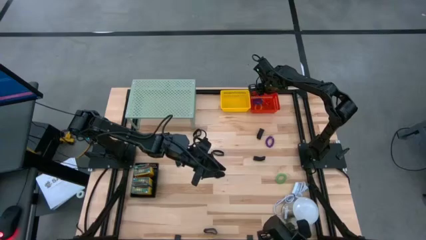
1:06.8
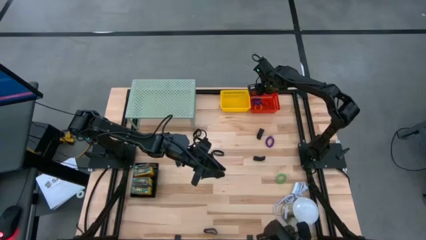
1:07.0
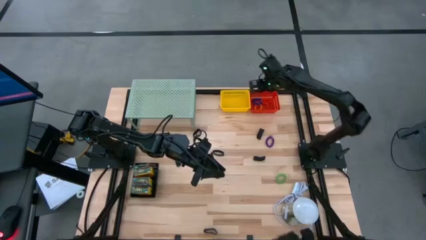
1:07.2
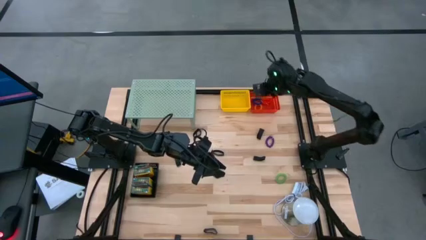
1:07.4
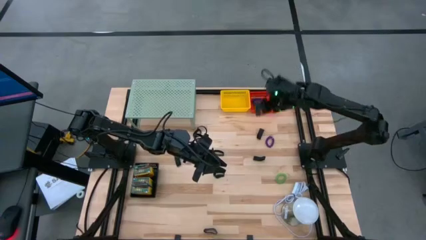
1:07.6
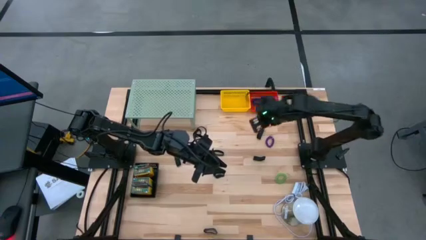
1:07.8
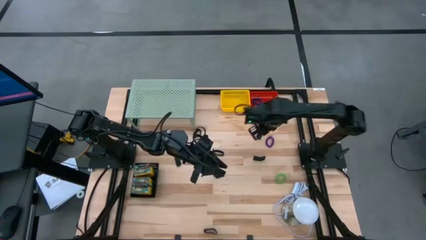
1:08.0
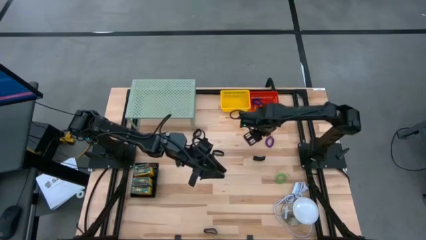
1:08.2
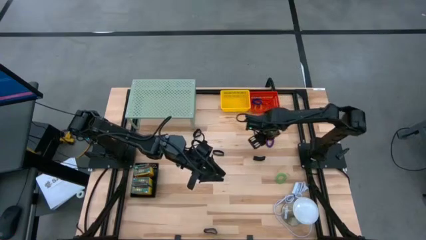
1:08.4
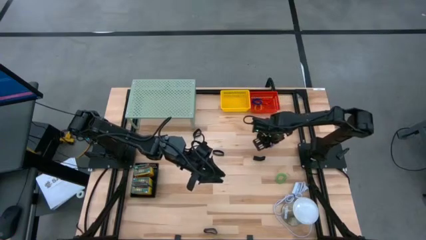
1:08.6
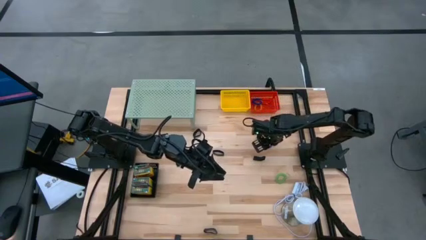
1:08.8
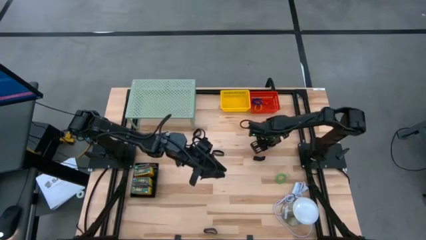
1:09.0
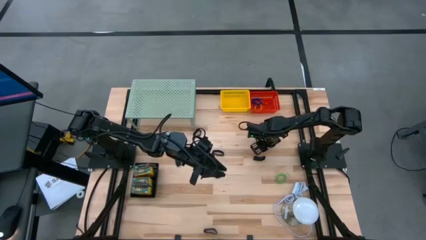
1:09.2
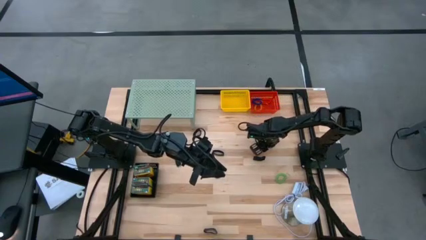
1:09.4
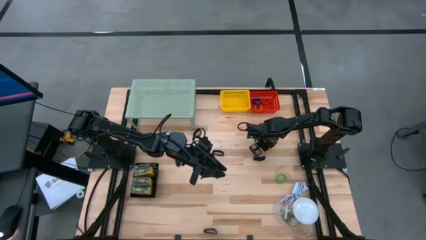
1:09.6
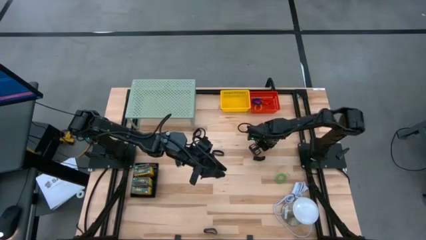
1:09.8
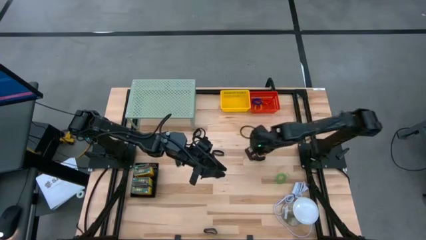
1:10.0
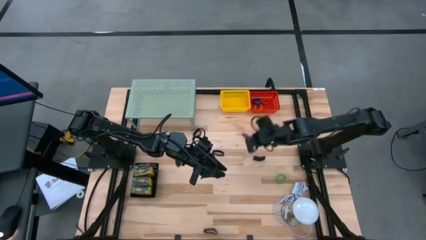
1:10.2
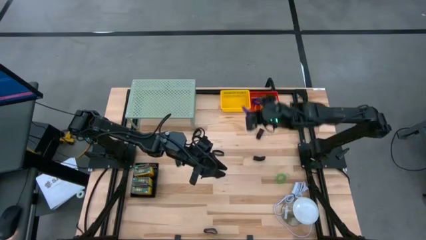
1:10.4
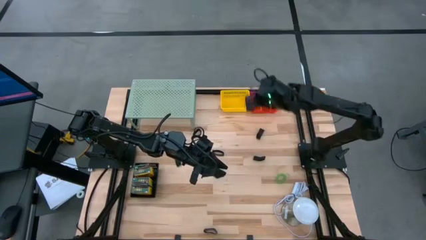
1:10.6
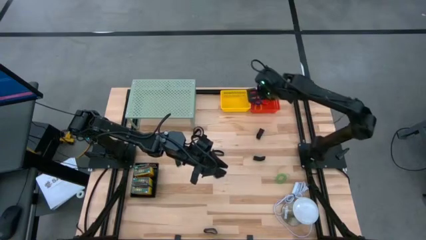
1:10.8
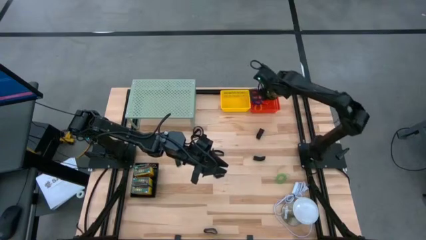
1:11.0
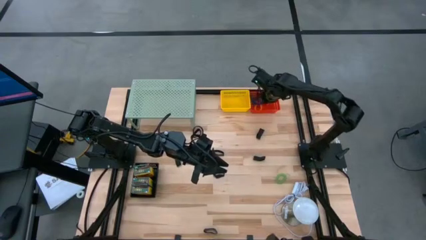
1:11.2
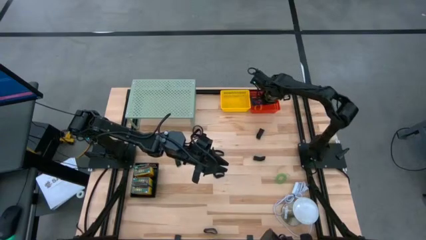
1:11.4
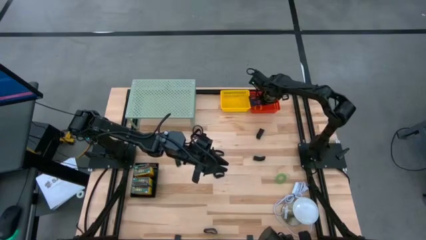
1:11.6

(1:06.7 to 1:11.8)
Task: Pick & Place Office Desk Supplies
Put the violet spring keychain into the red basket

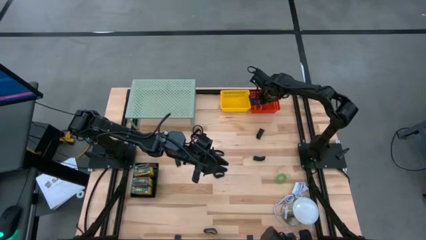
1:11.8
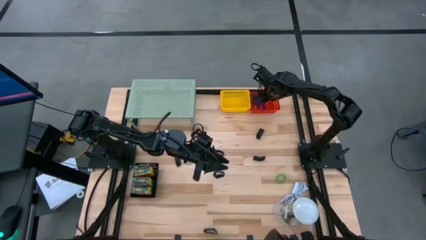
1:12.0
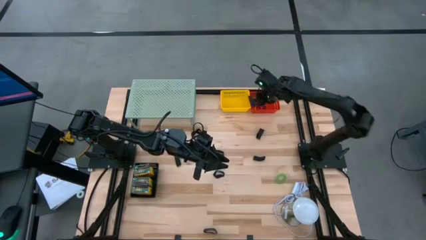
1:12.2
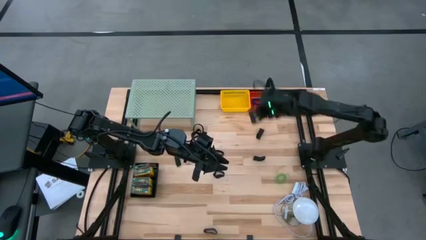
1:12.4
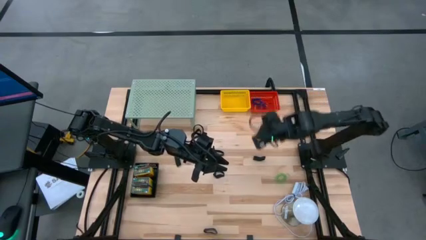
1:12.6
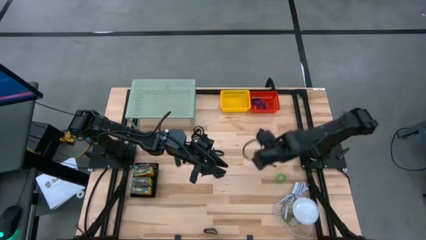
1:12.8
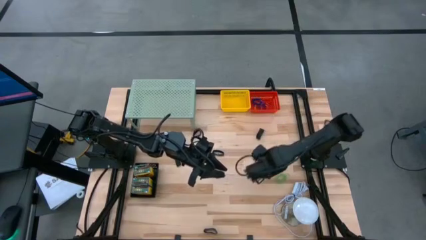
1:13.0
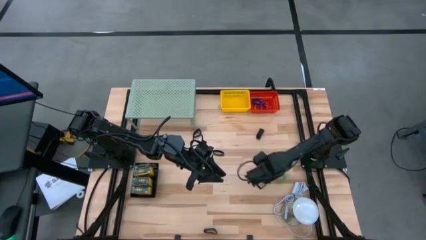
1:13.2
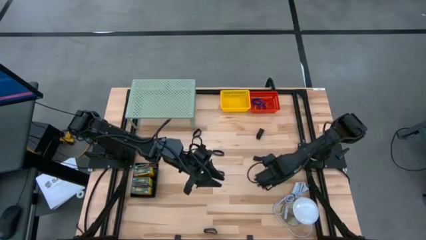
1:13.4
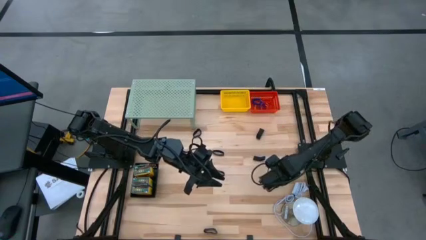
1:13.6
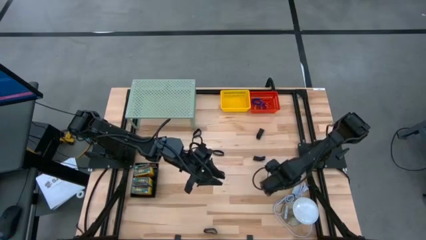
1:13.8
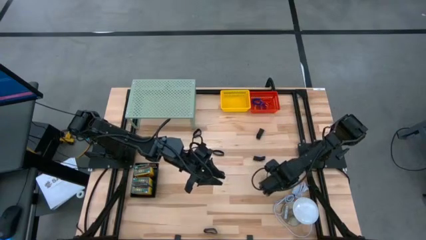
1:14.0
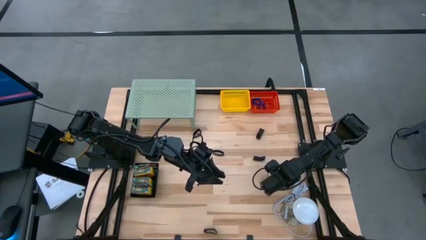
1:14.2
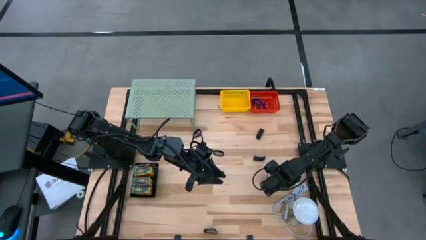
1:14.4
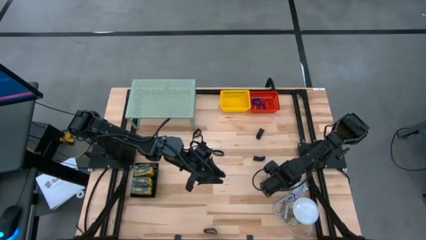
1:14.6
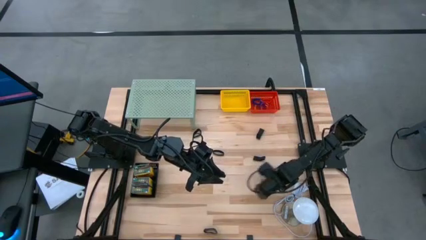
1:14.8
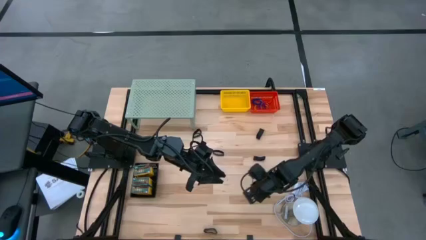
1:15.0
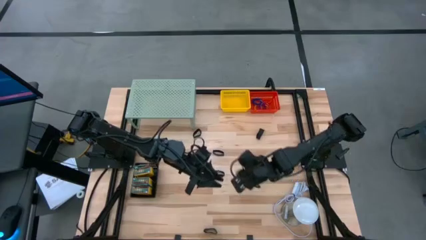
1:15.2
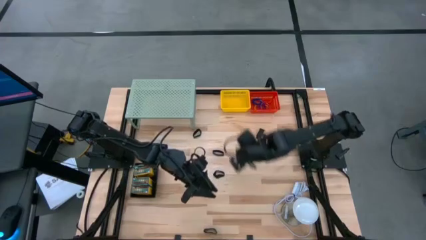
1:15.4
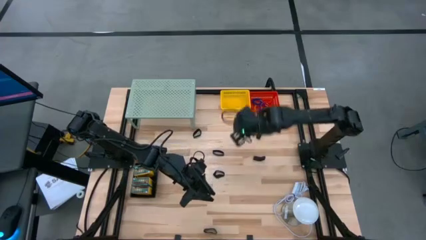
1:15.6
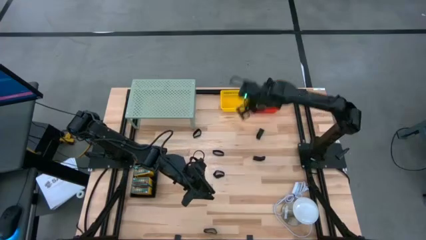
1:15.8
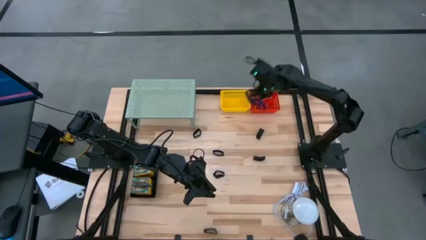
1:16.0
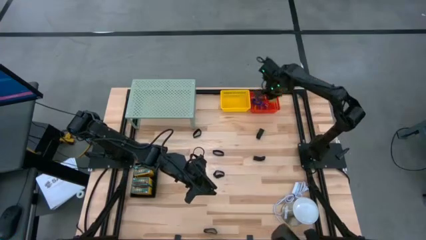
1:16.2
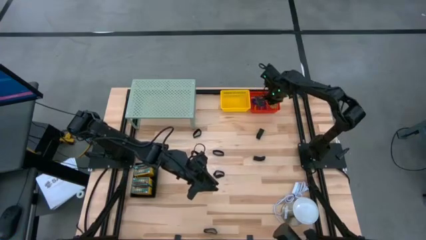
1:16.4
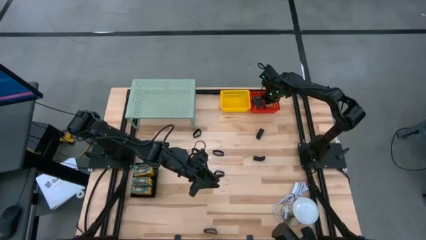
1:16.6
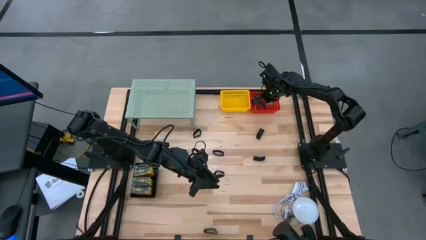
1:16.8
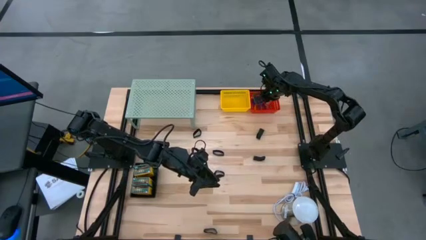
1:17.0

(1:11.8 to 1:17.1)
Put the green spring keychain into the red basket

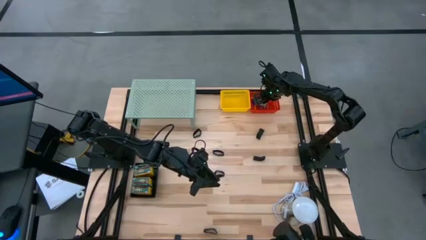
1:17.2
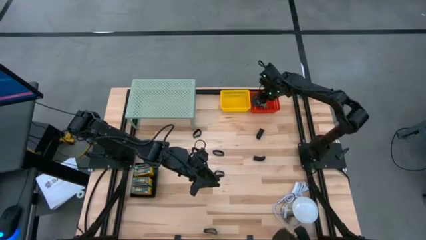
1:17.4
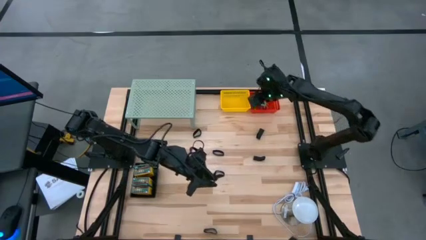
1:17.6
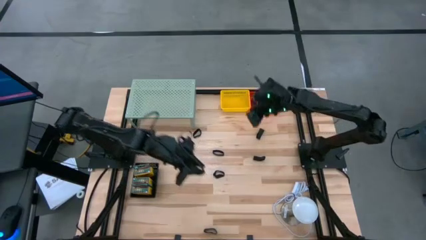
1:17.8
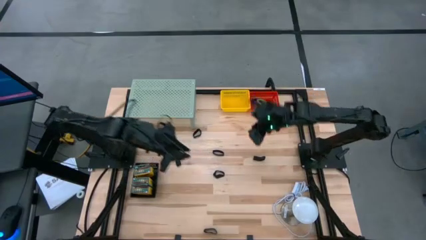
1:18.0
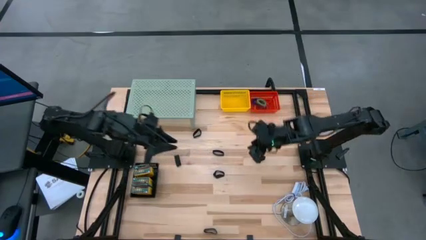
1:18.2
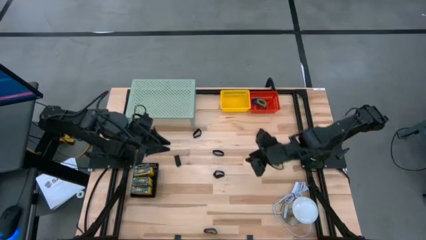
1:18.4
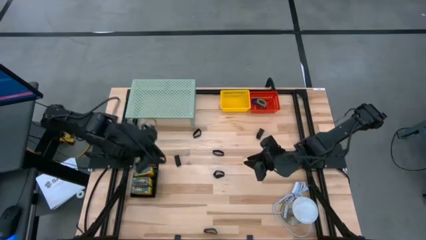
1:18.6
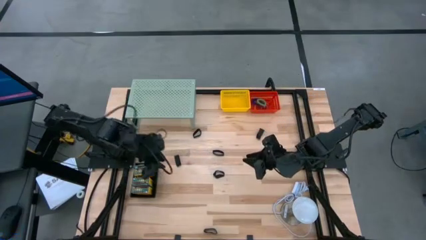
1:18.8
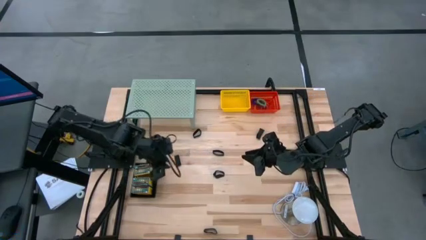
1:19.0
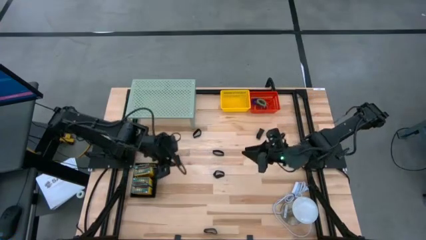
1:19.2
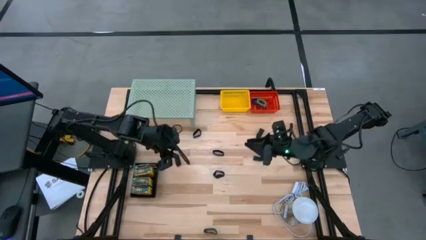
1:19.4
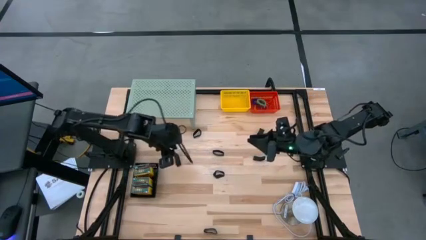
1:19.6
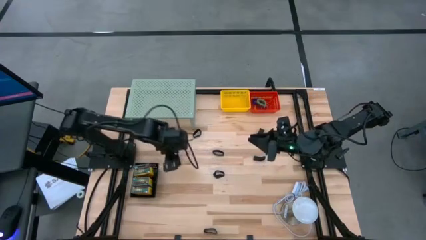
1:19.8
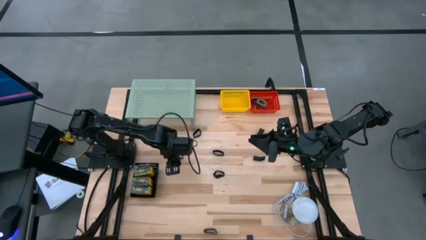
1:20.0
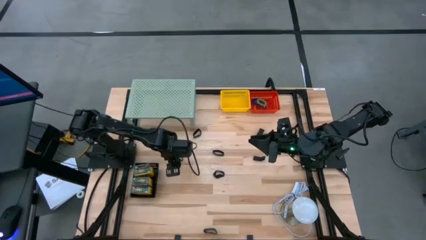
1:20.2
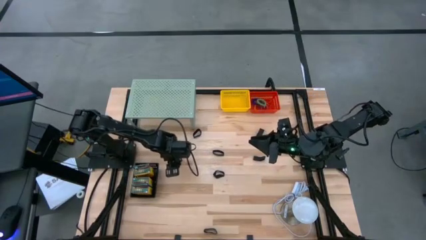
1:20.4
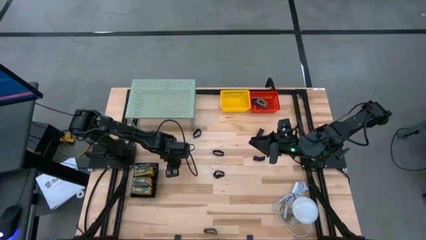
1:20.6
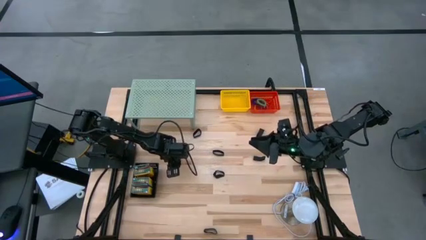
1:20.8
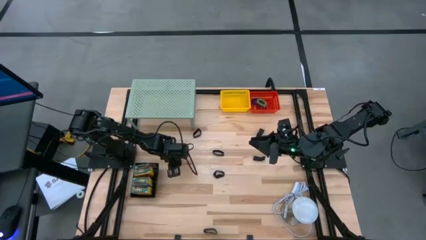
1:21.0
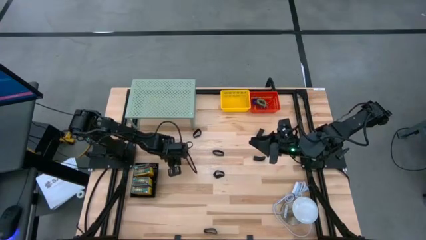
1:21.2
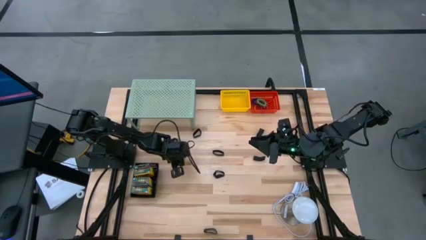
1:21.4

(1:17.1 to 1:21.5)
Put the black rubber band into the yellow basket

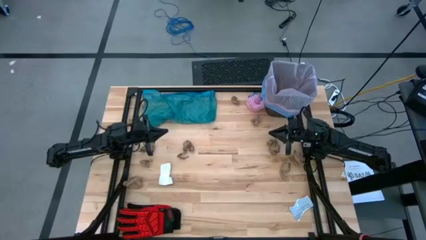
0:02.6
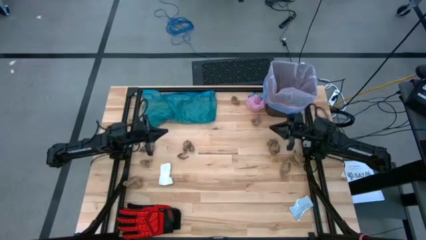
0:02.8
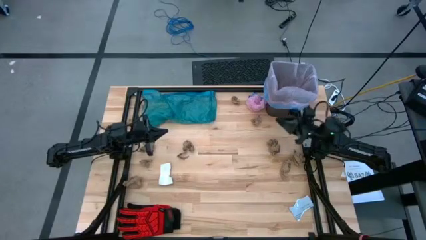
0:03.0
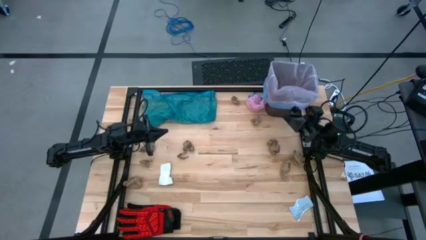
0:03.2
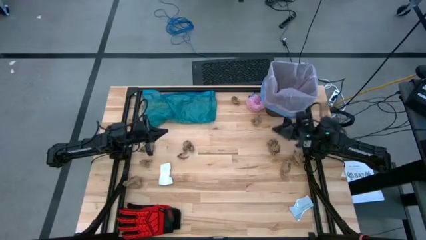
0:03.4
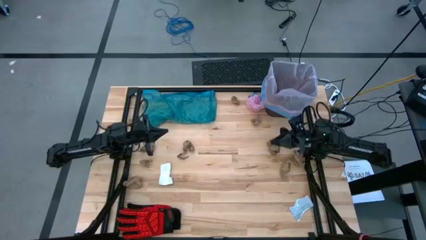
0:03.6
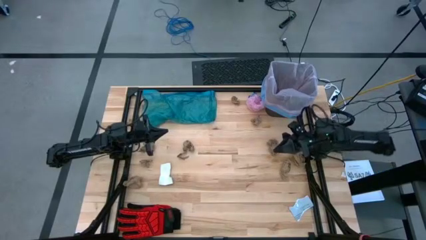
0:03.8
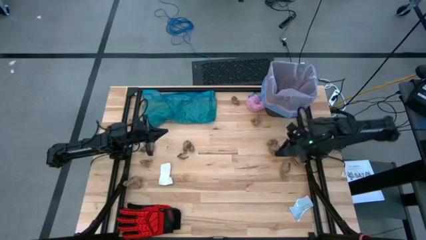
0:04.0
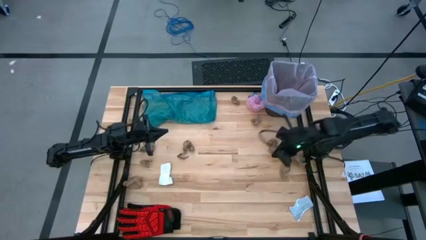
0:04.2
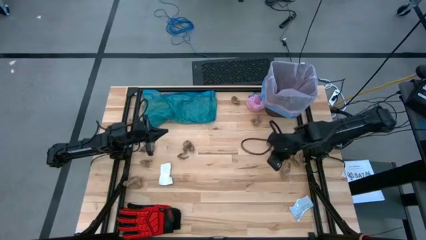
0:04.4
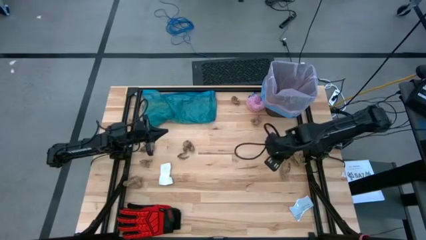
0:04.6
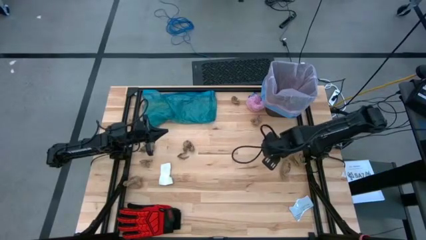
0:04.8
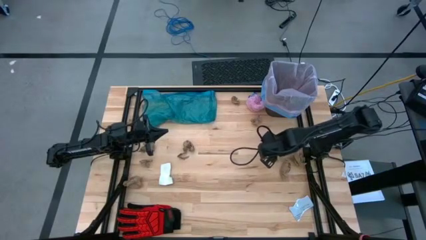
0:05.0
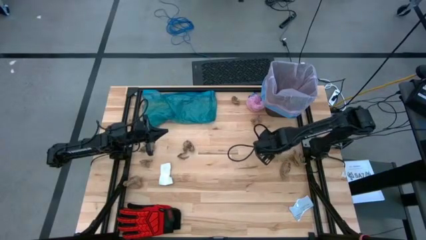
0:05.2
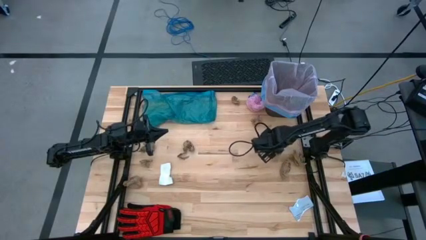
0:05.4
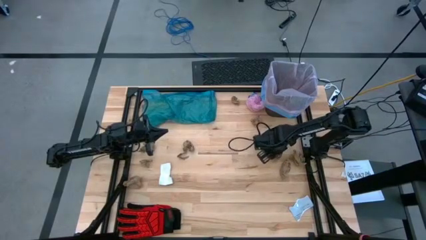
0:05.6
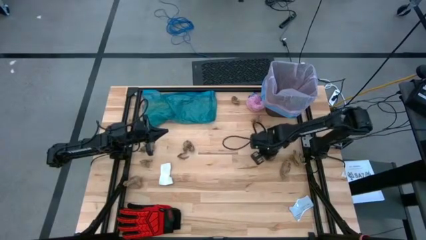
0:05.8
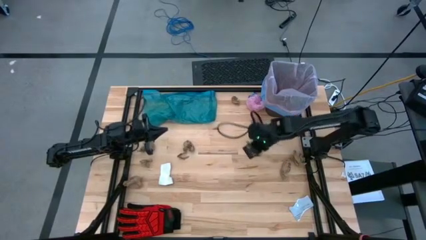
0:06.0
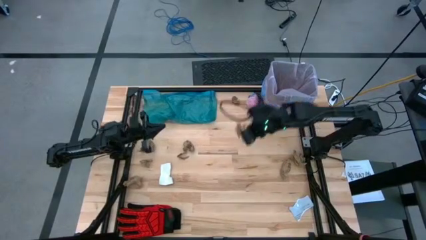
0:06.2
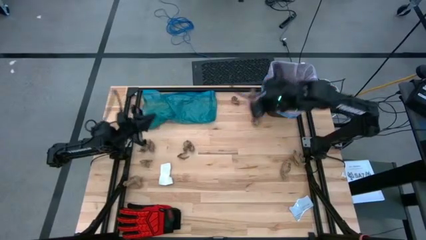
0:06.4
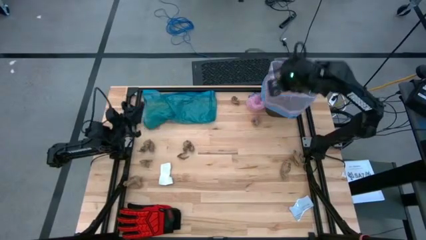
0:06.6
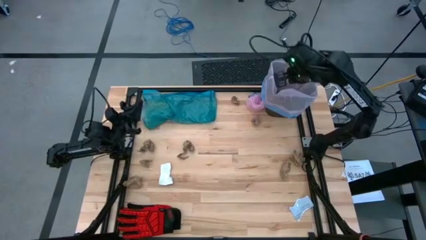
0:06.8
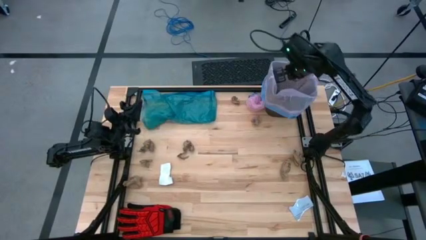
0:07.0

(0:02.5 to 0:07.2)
Task: place trash/remove bag and relplace
Put the brown paper into the black trash bin
